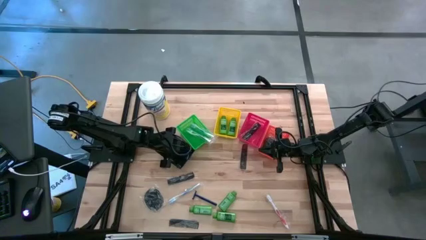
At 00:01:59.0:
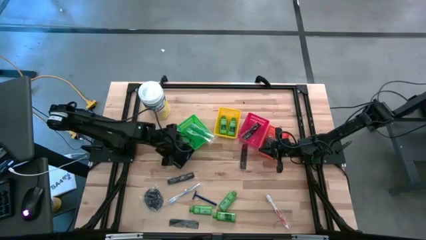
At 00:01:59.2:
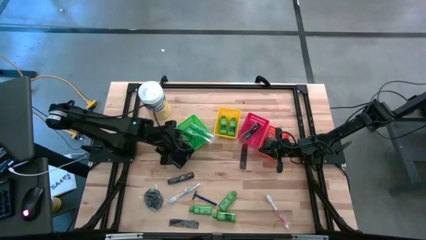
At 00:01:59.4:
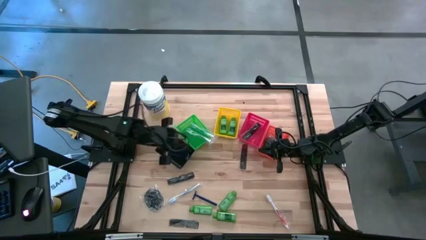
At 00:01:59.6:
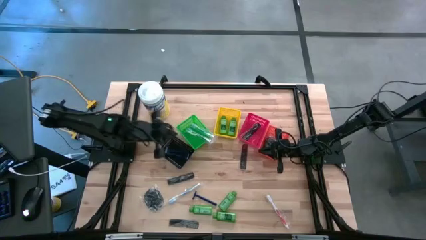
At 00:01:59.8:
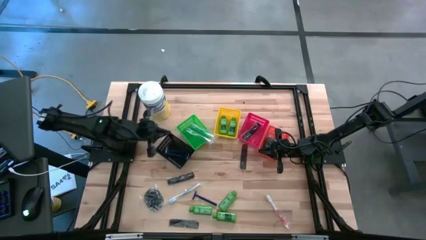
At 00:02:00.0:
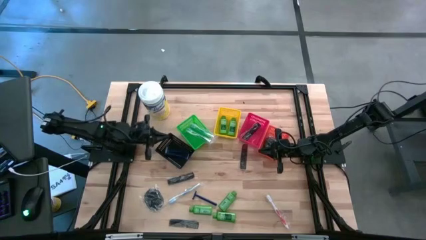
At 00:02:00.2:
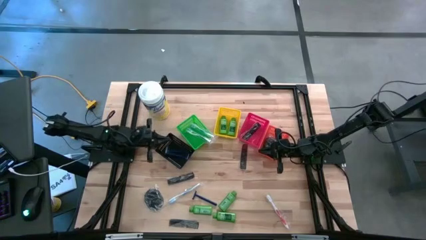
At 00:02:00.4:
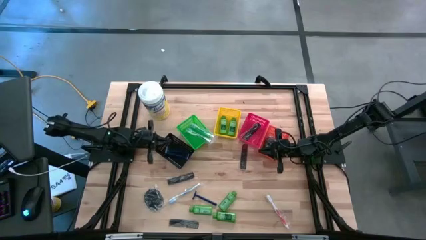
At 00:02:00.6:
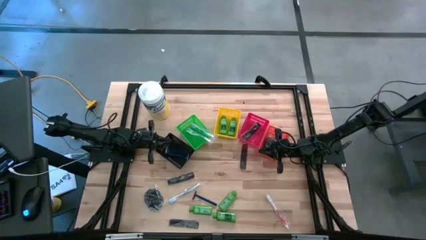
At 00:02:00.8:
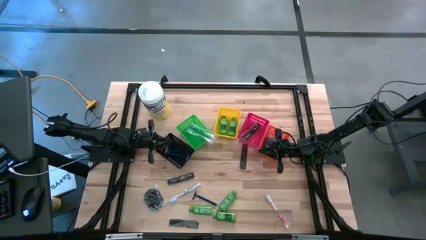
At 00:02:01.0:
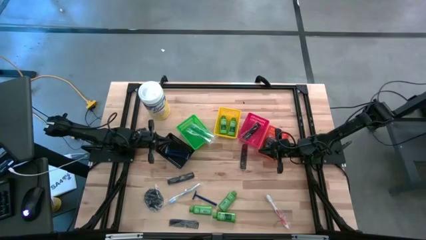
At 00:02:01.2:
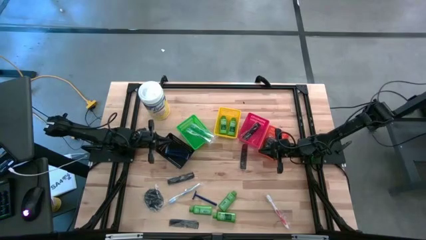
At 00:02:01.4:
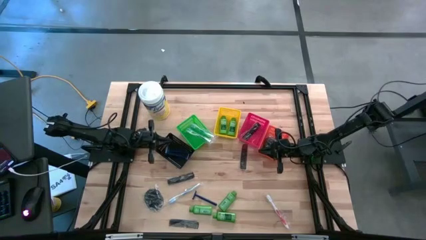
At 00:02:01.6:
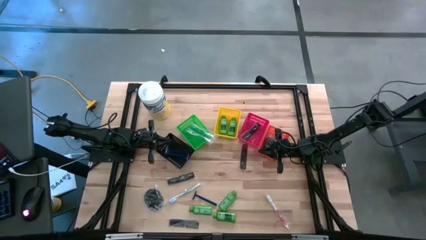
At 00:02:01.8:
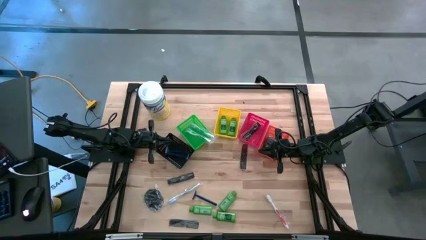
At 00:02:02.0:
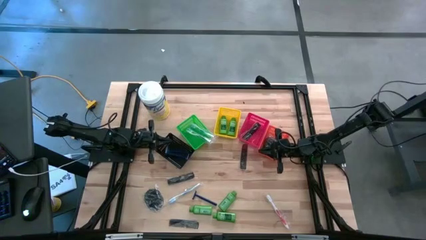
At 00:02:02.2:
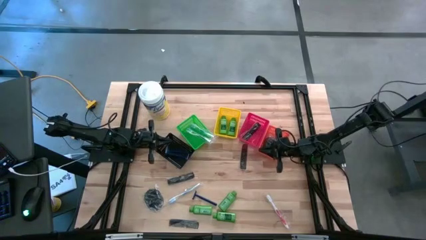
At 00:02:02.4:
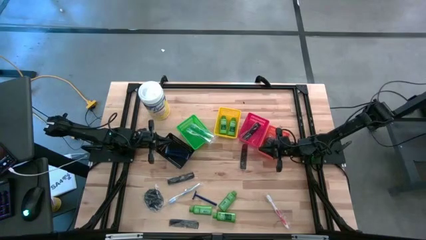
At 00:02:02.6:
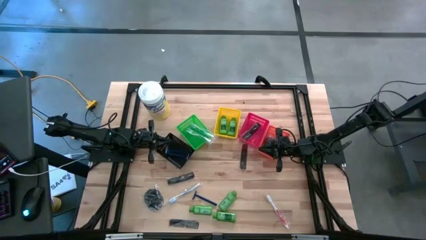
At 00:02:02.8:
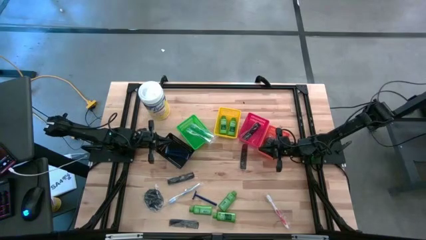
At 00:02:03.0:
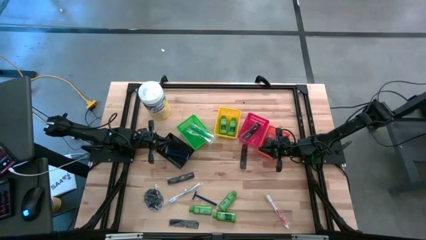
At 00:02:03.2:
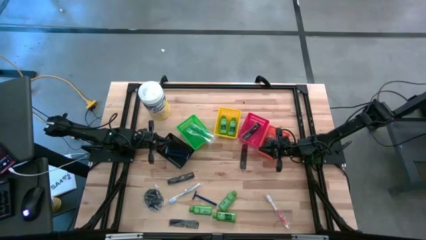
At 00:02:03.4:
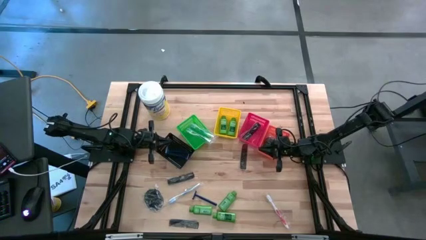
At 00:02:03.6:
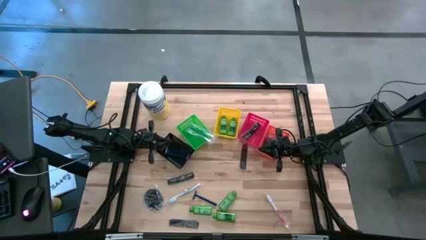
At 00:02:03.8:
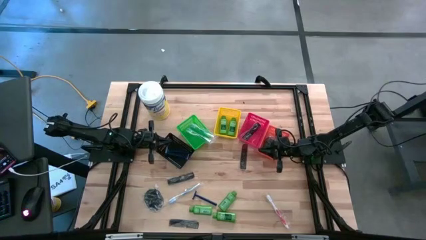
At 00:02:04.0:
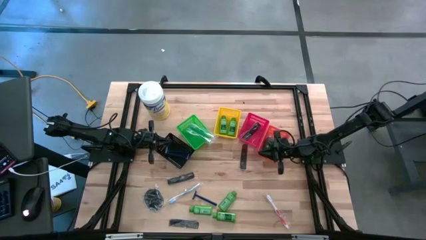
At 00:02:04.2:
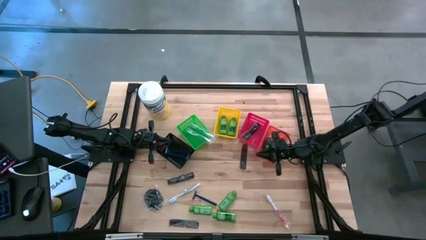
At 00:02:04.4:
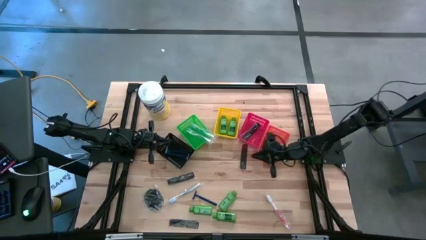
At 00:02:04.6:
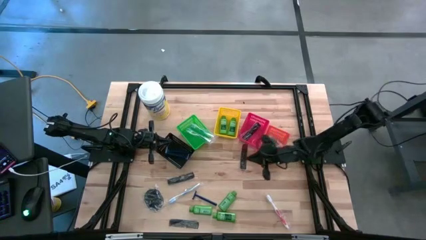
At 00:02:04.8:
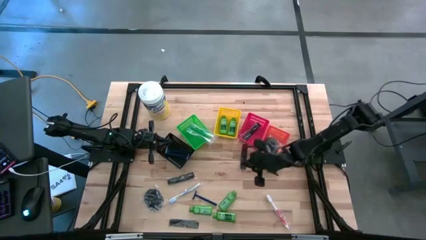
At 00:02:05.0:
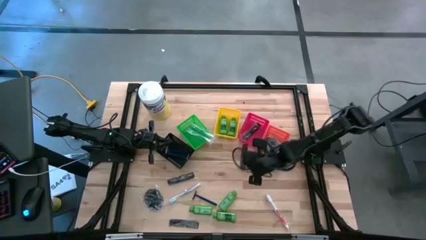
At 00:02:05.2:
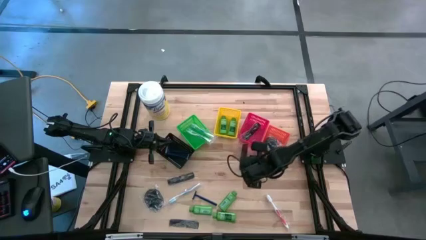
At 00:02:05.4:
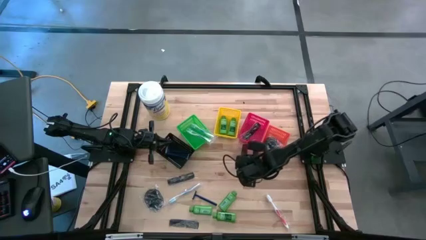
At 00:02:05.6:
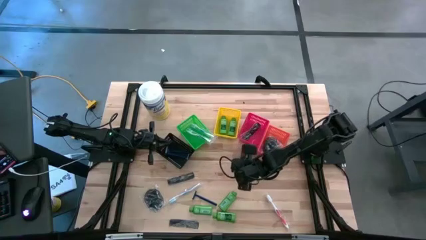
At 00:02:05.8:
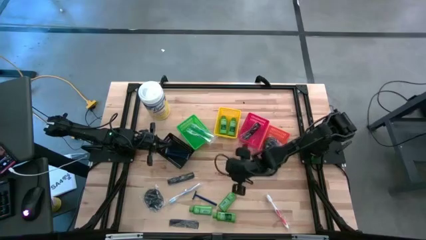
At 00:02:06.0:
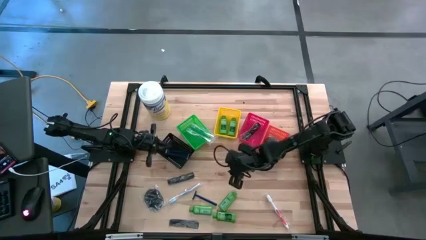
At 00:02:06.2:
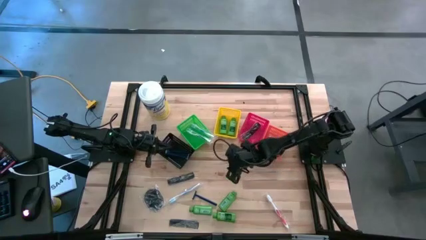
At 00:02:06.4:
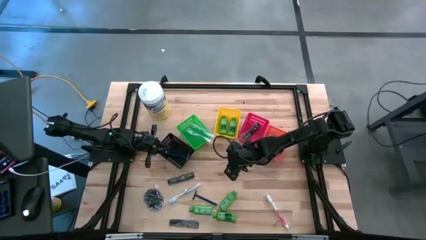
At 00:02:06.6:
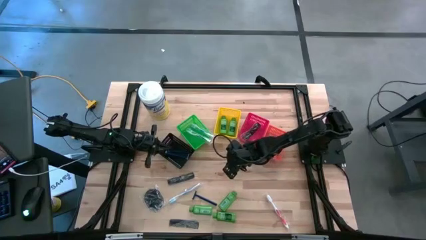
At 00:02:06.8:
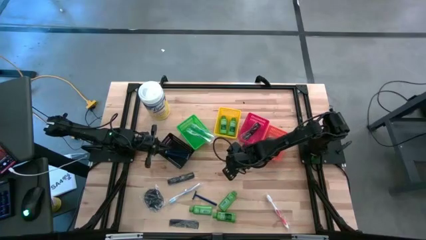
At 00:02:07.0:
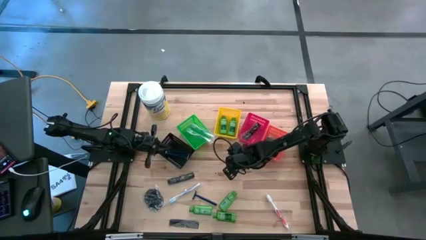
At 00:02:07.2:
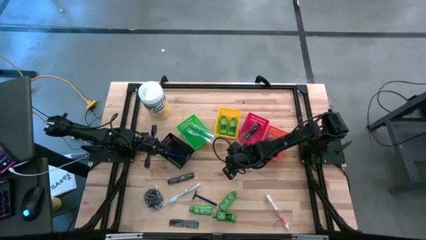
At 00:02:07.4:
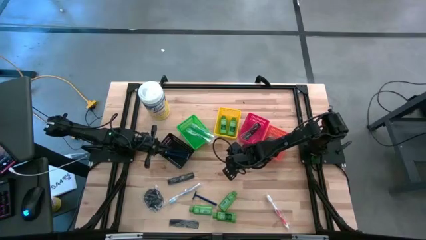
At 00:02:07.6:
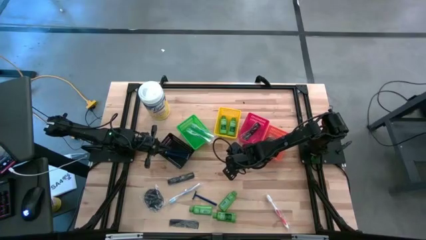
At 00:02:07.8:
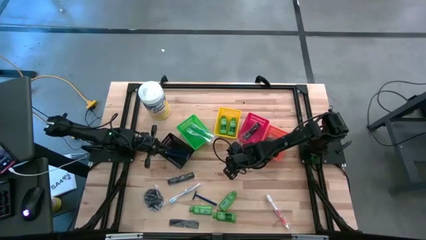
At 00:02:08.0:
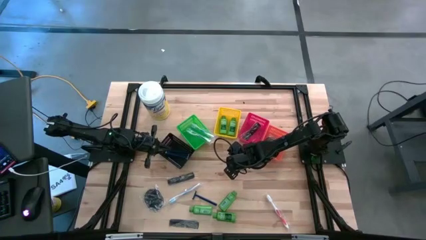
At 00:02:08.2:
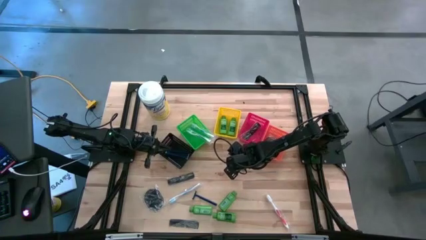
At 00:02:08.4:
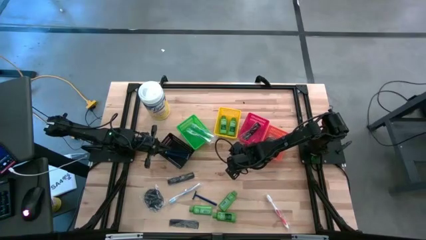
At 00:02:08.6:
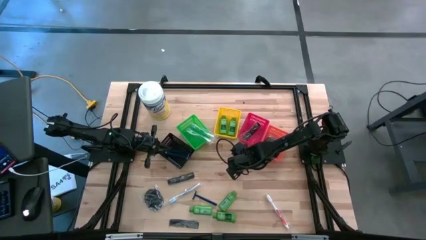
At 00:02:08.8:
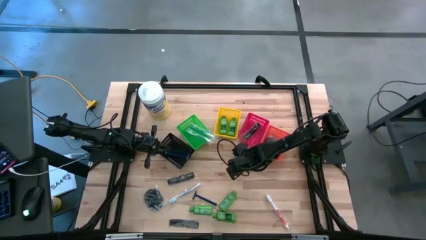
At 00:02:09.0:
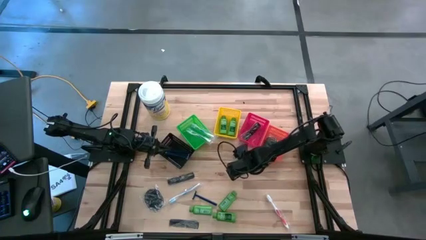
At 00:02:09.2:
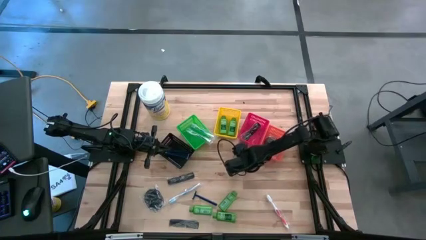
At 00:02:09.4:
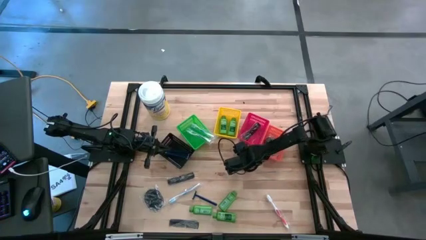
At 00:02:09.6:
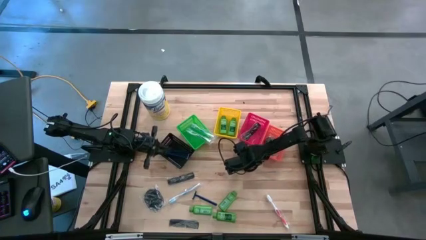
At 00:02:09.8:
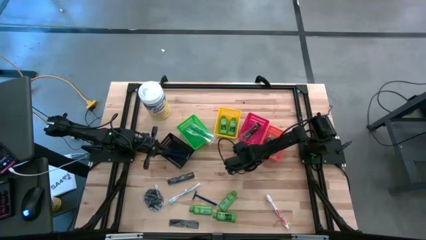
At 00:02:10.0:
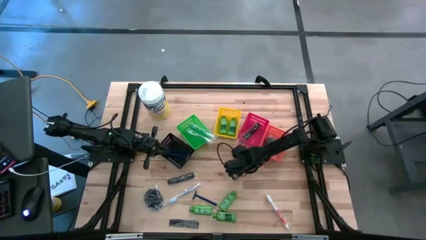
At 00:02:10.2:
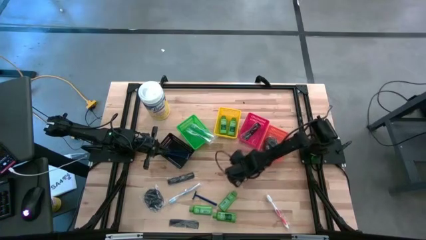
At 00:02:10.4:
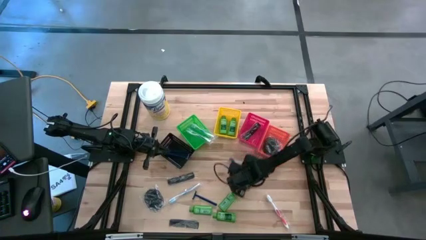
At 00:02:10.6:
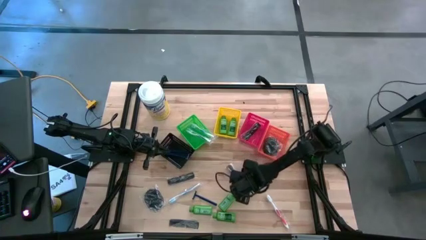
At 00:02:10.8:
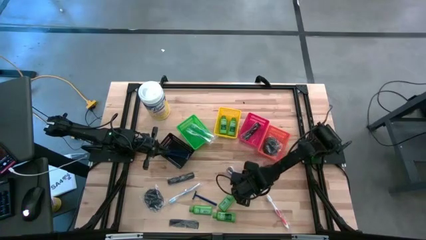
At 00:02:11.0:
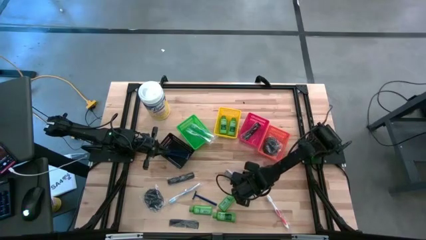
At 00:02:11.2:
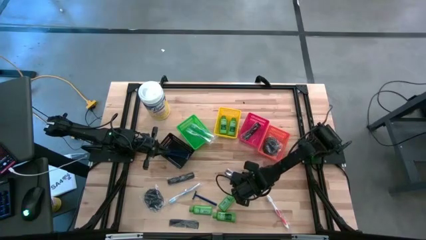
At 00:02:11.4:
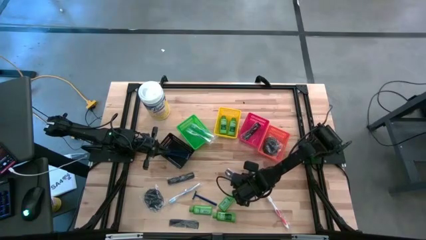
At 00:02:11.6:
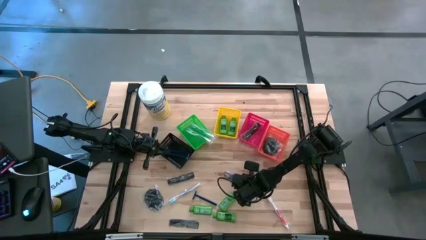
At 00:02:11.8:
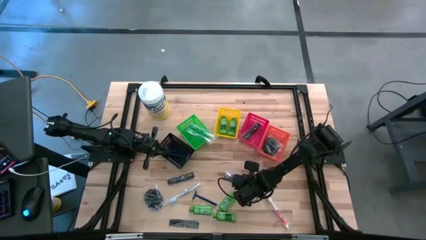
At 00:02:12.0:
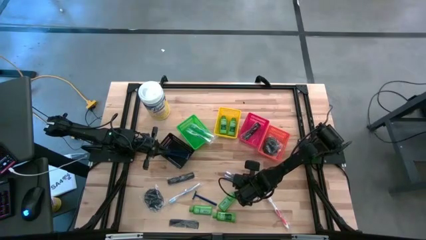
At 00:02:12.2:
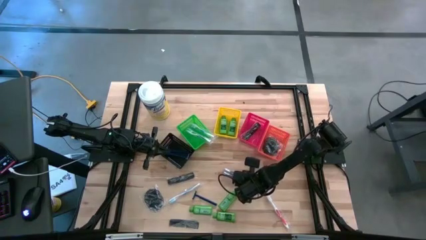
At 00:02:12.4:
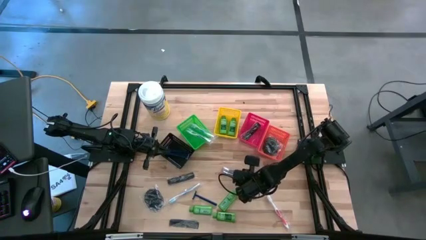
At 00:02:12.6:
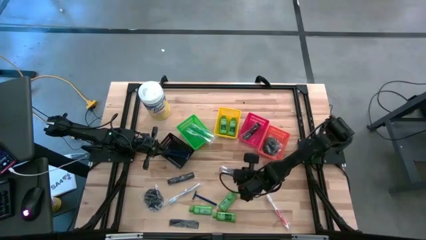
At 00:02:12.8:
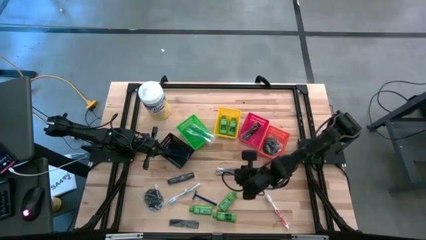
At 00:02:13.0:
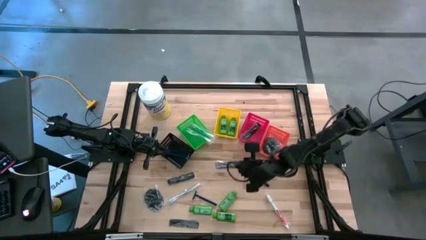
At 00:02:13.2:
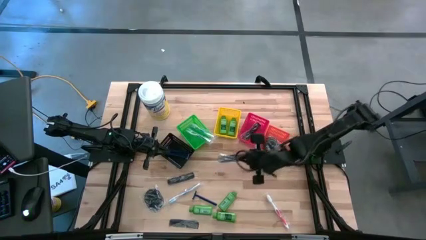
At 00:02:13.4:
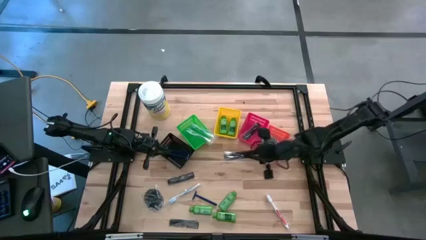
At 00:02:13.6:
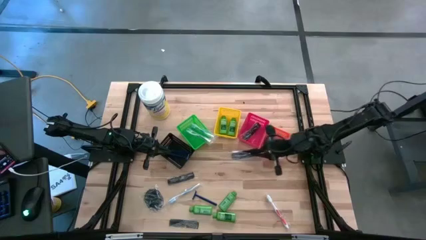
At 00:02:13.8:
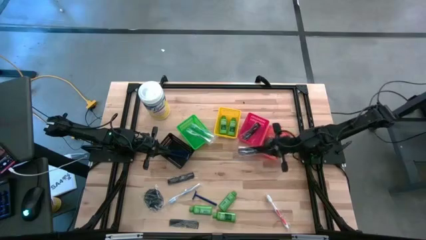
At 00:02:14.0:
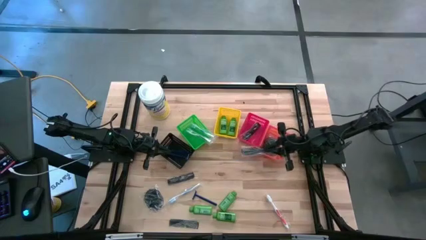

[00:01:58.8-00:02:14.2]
Task: Pick & Place Travel size toiletries
Put the black comb into the red bin

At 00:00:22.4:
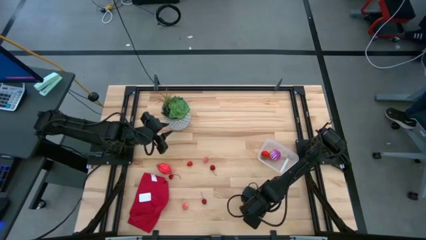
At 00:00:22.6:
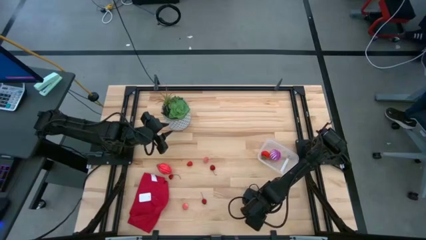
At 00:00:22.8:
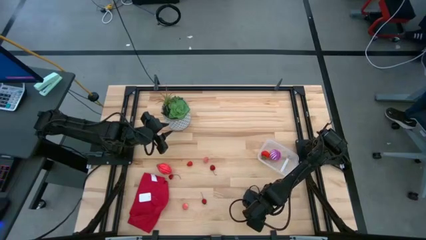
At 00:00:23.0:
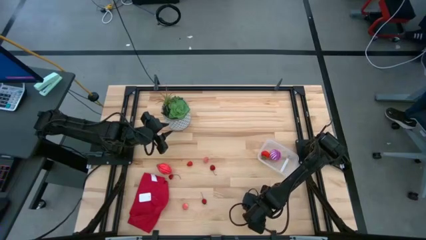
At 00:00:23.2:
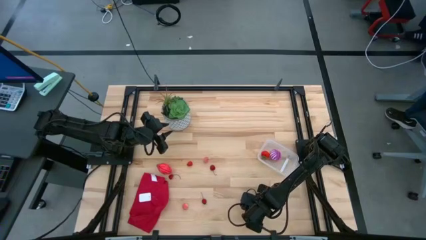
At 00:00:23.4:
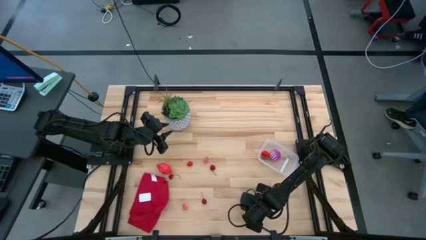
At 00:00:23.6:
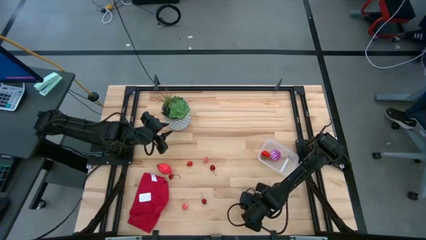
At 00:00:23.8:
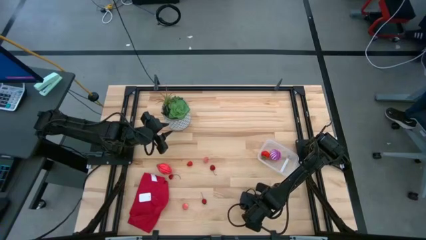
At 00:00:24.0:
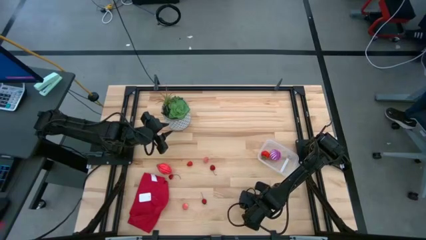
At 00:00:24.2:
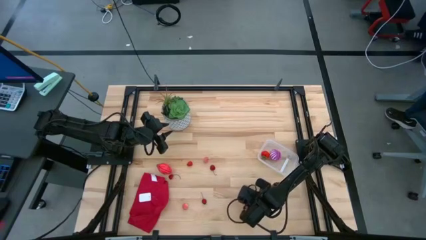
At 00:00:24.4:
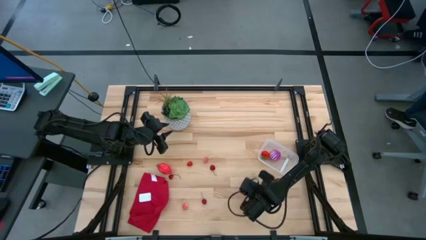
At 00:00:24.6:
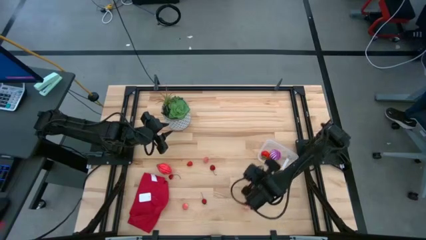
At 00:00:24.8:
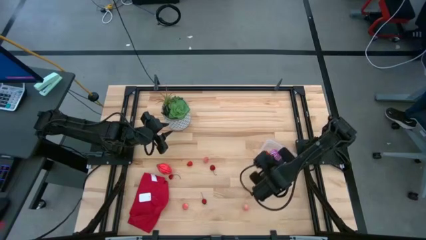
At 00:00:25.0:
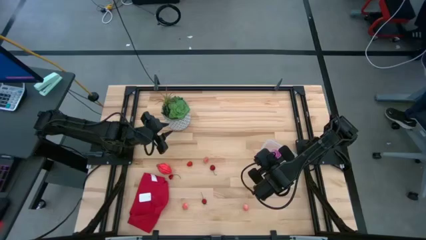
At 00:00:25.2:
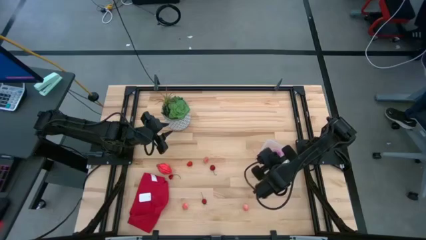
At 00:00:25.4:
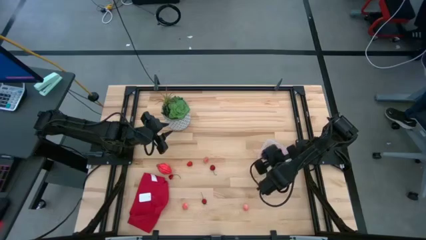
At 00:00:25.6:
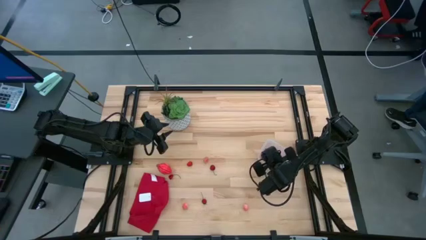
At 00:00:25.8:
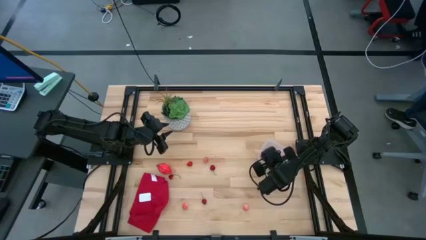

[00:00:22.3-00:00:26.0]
Task: Pick and placing Produce into tupperware
Put the bottom right red cherry into the transparent bin
